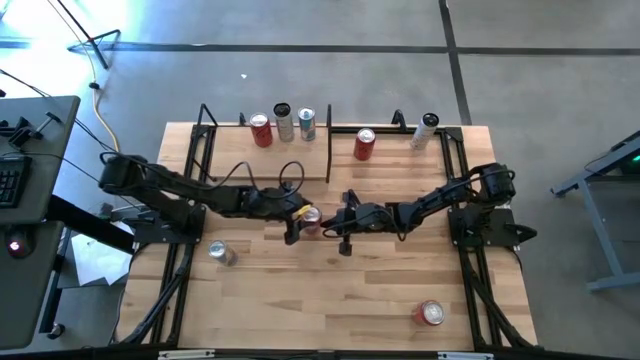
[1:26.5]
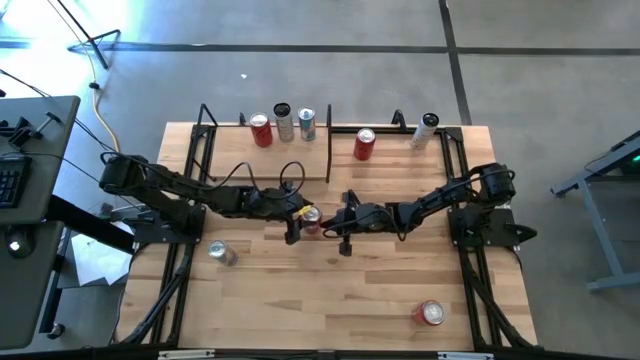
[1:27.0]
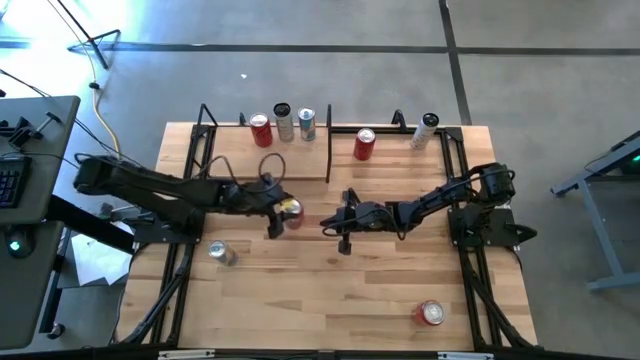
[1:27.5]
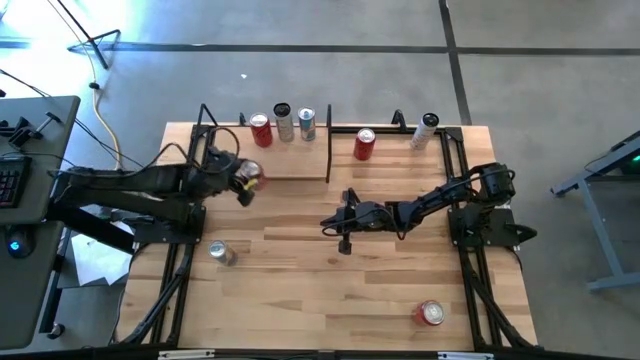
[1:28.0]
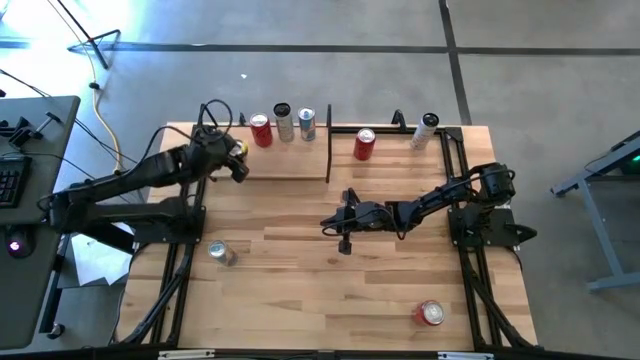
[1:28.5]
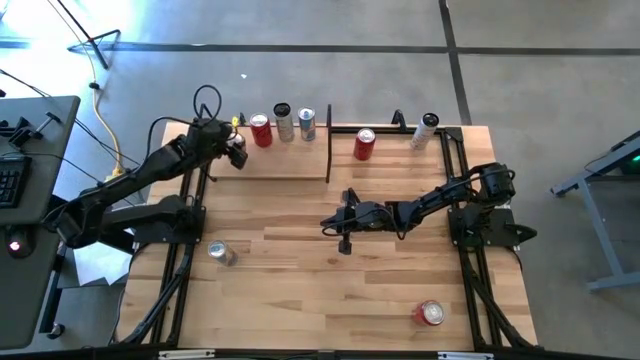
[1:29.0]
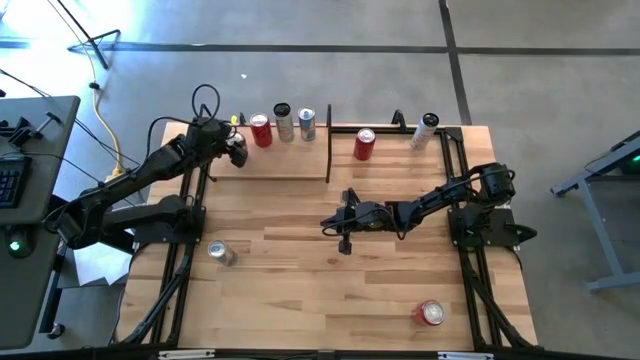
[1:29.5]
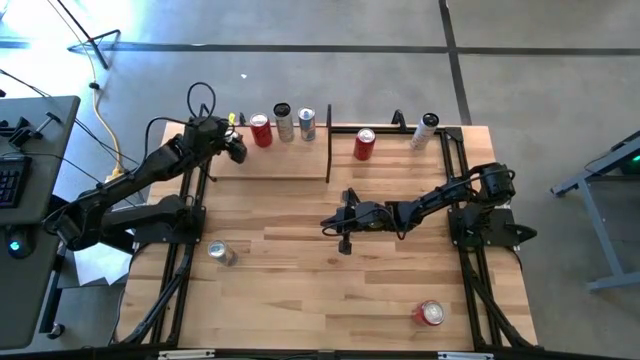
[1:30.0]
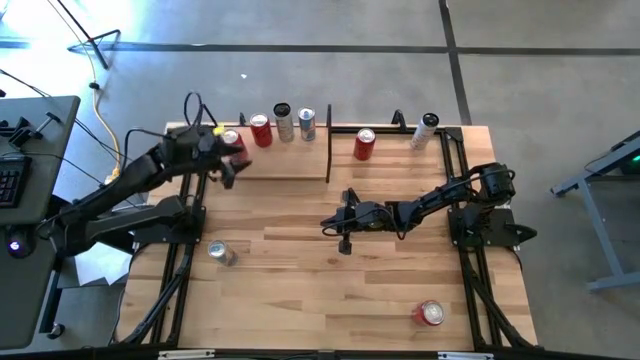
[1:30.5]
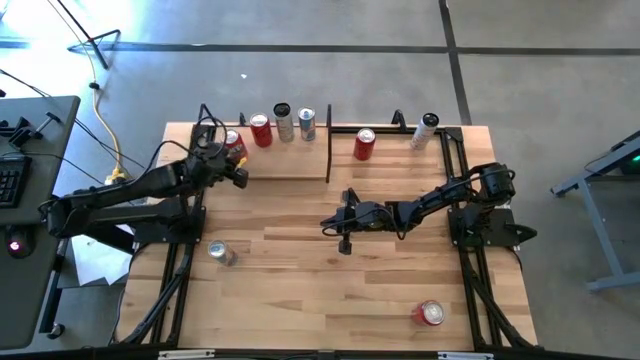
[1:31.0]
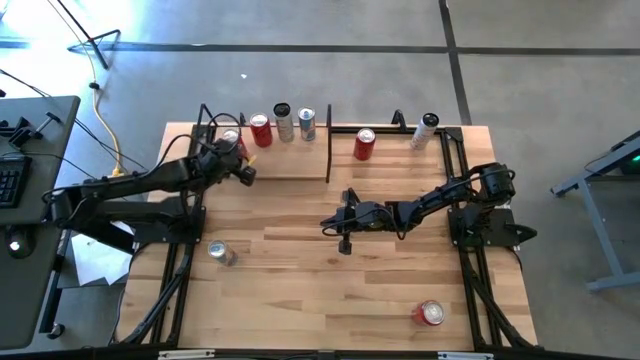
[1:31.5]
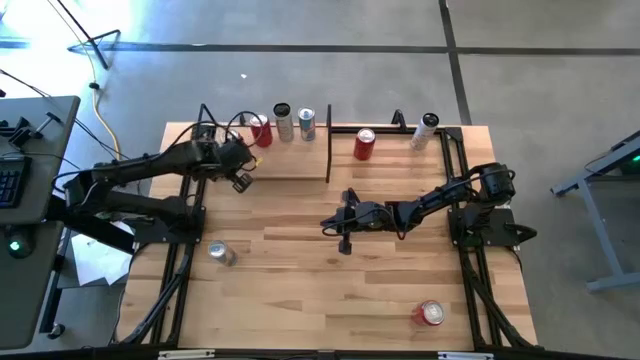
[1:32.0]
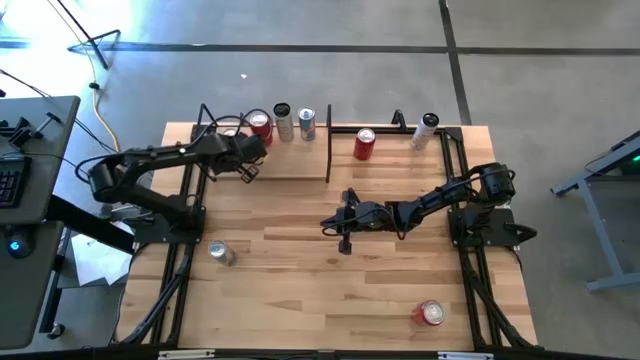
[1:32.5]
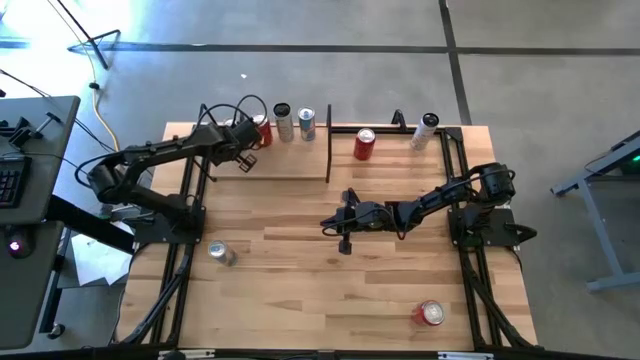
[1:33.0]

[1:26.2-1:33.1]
Task: Place canned beverage on shelf
Put the left red soda can on the shelf

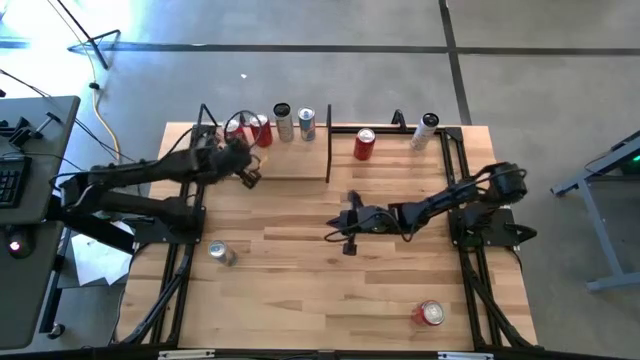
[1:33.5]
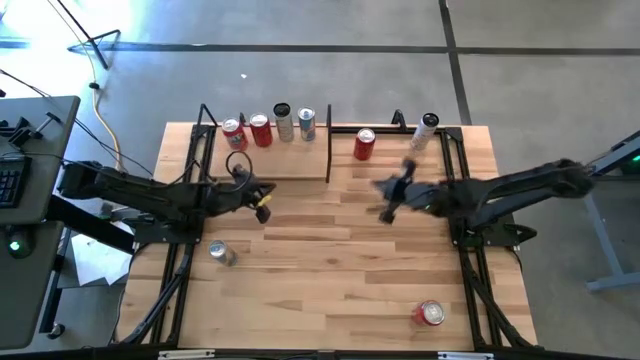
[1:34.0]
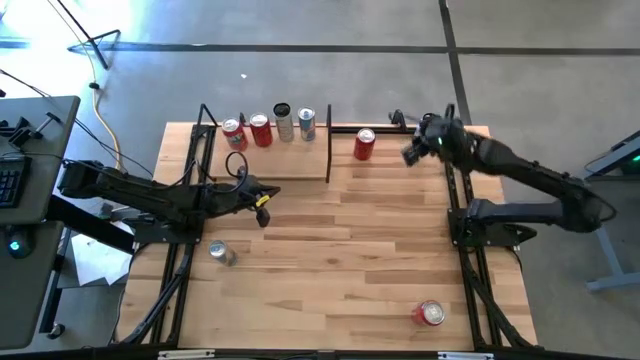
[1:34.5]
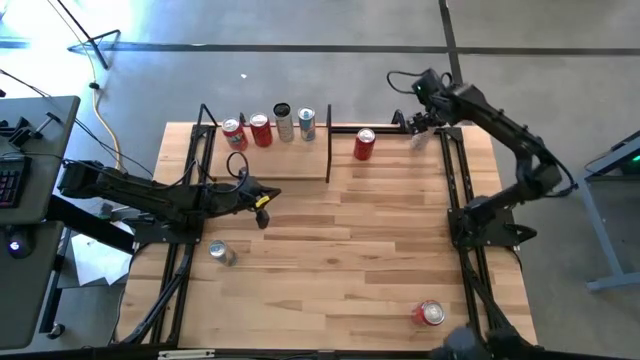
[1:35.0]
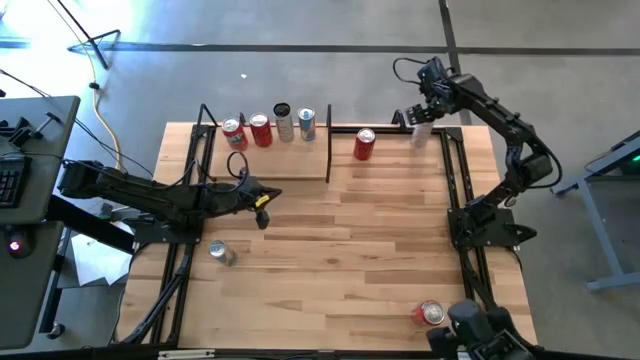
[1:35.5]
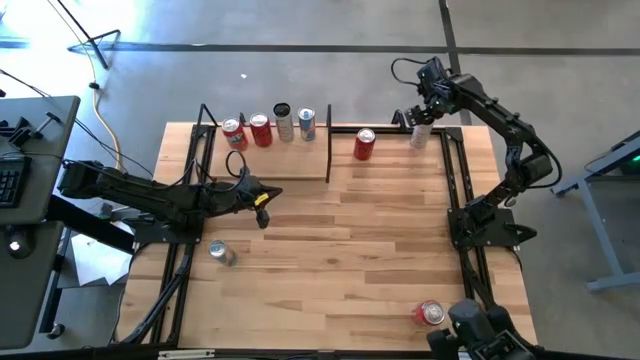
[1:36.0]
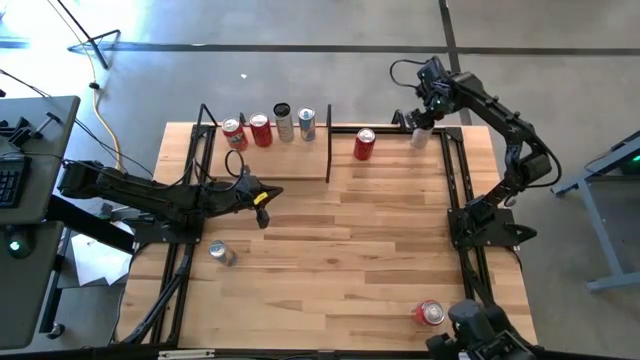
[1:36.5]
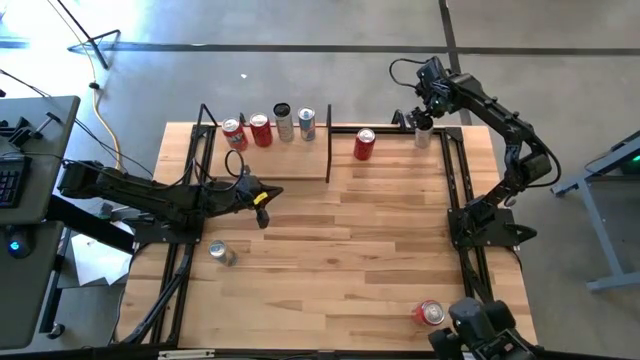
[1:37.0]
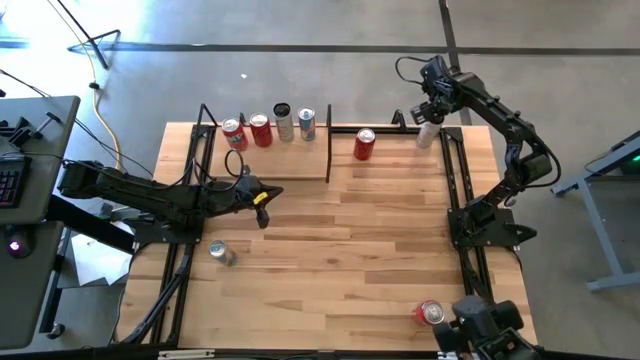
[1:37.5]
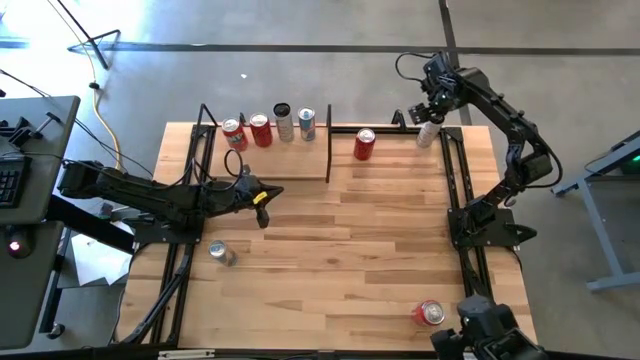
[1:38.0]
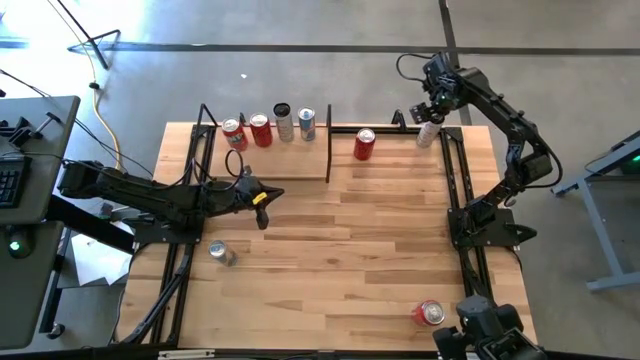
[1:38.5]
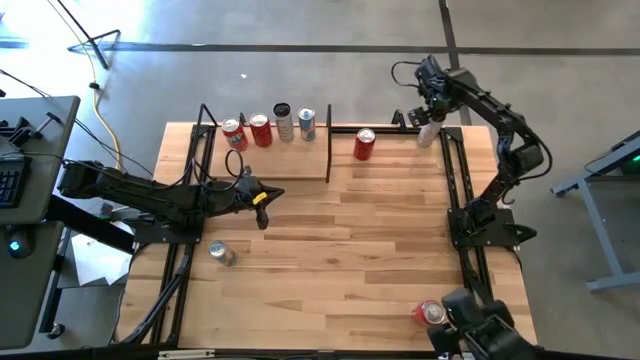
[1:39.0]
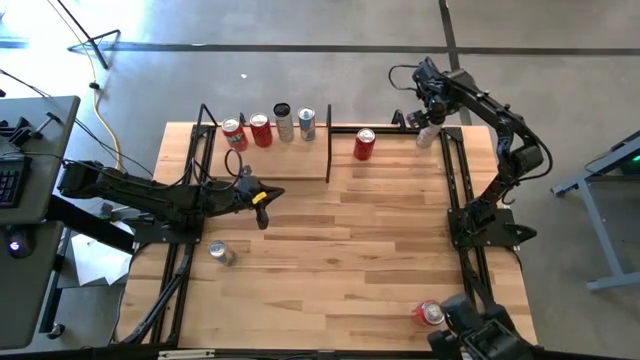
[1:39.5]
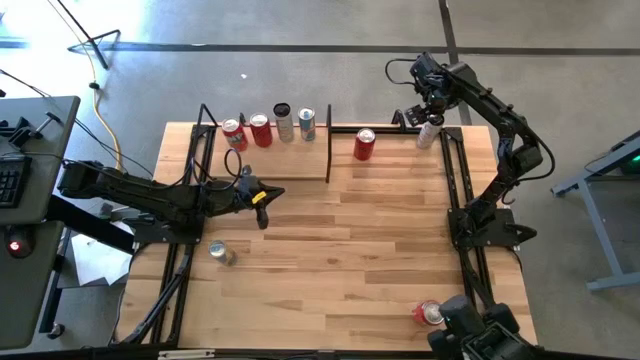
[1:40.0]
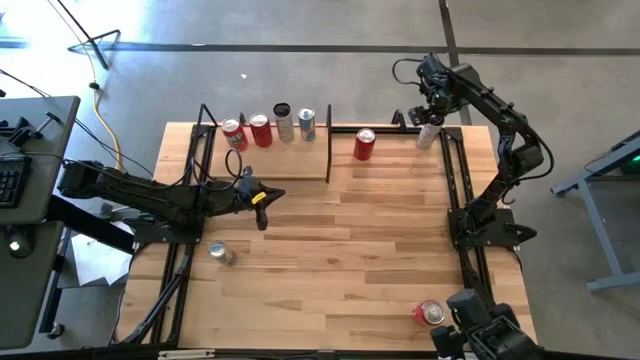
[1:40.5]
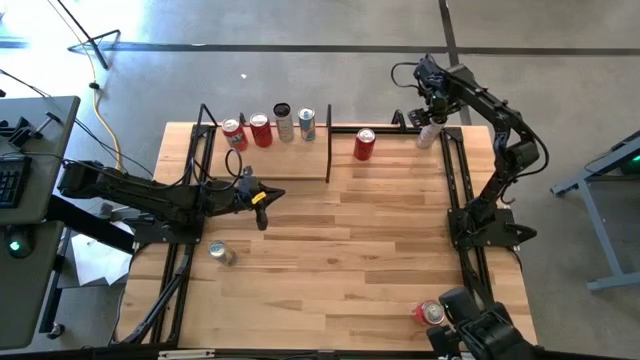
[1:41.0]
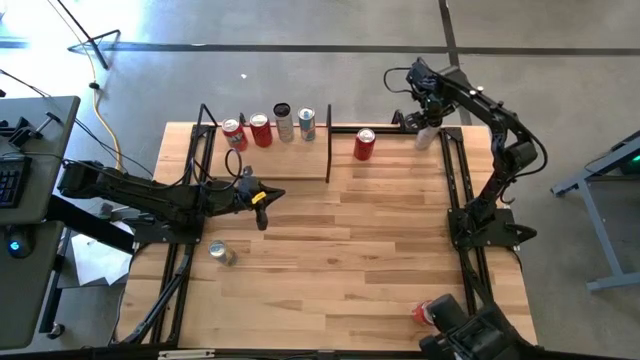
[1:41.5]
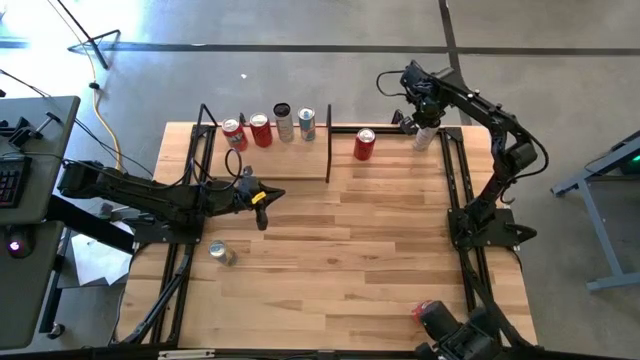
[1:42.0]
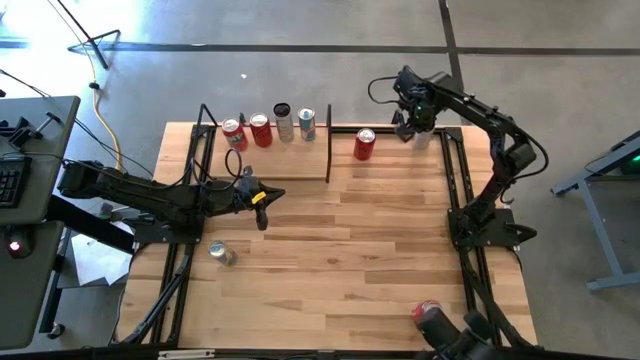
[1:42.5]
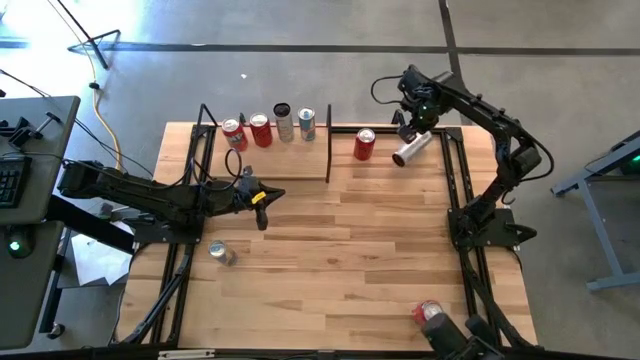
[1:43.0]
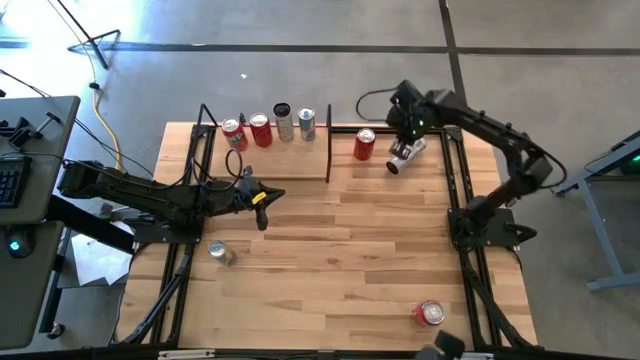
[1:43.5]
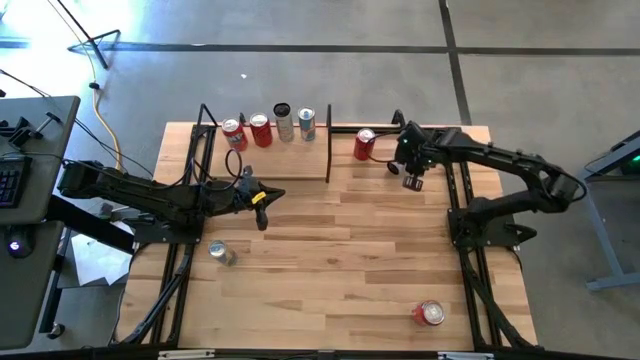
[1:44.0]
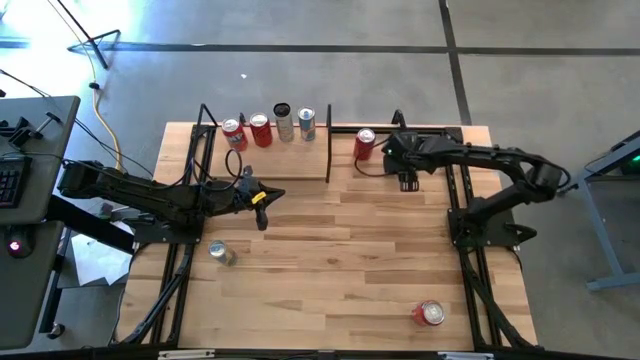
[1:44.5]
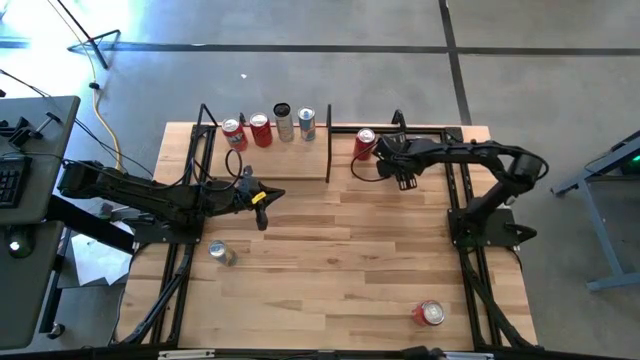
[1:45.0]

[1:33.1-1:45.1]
Put the white soda can on the shelf
